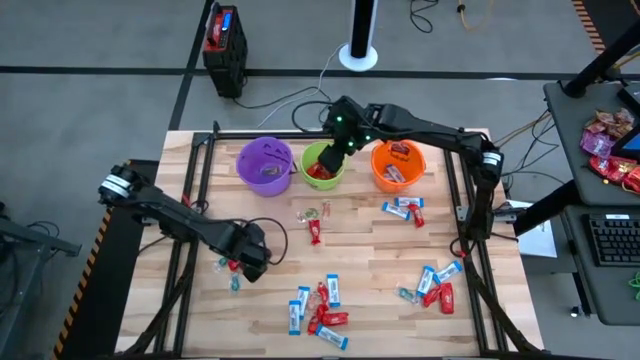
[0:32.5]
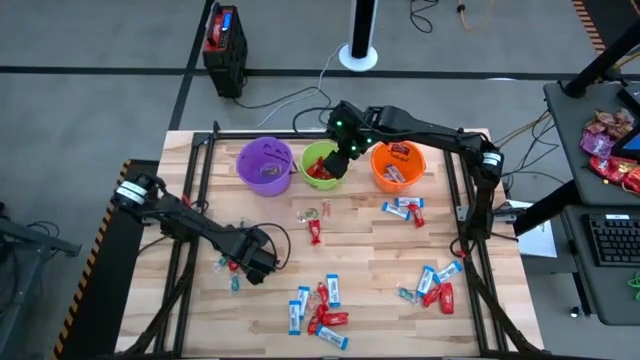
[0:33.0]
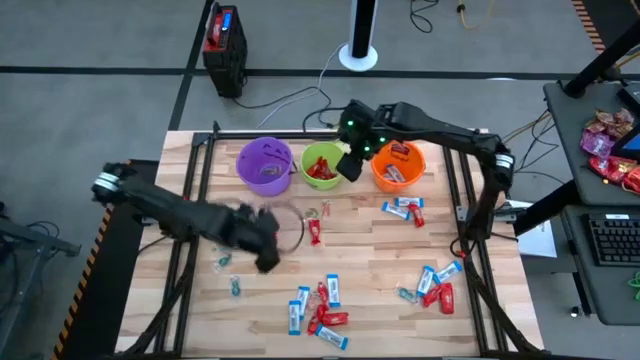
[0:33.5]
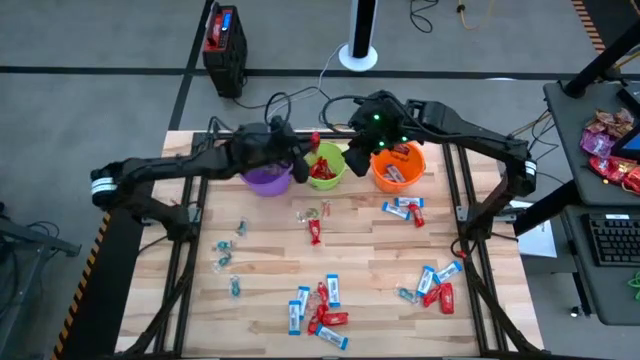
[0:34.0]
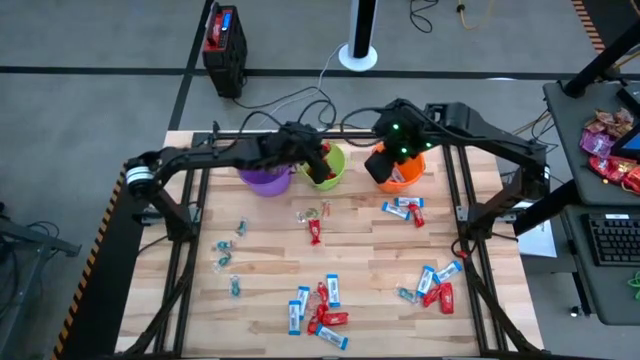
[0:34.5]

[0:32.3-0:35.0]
Task: Sort candy by brand, put in halloween buckets
Put the red chocolate bar into the green bucket

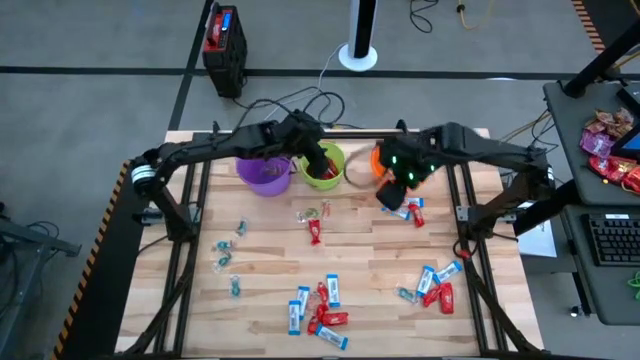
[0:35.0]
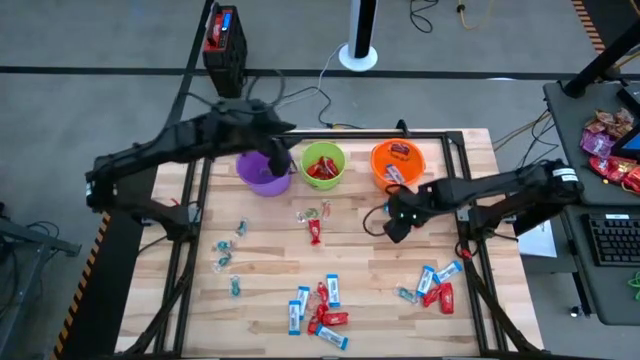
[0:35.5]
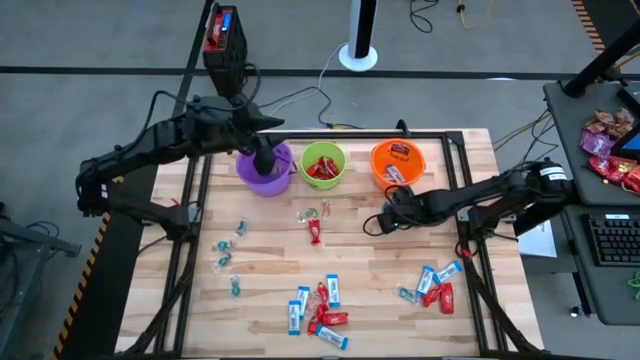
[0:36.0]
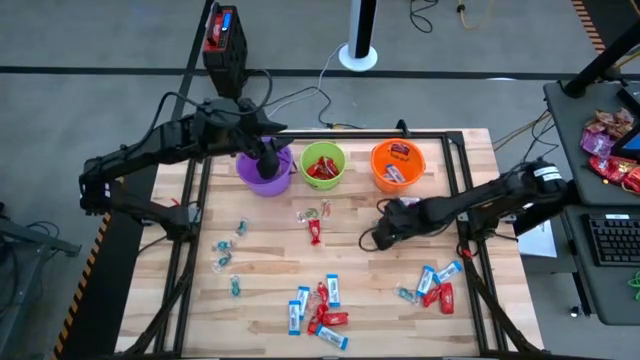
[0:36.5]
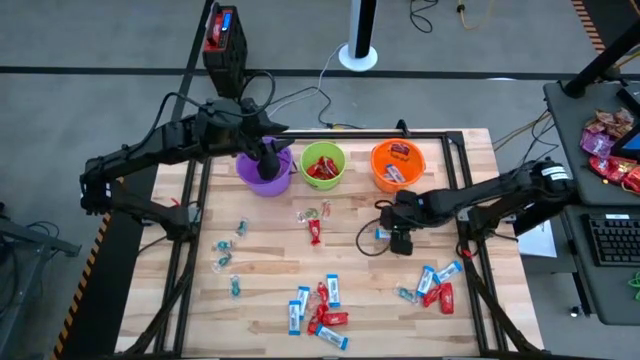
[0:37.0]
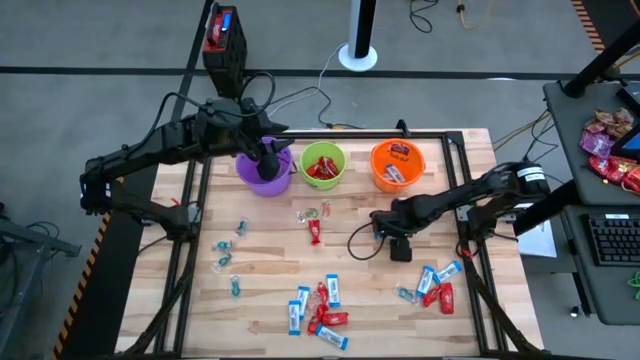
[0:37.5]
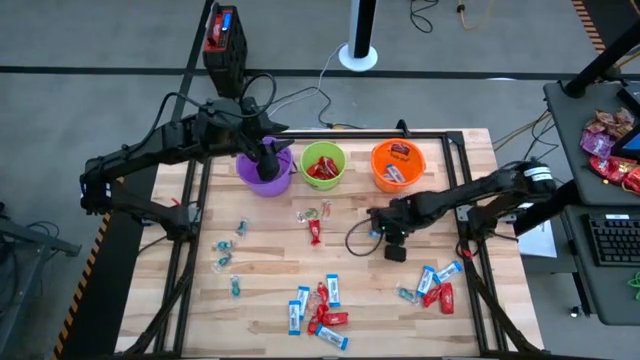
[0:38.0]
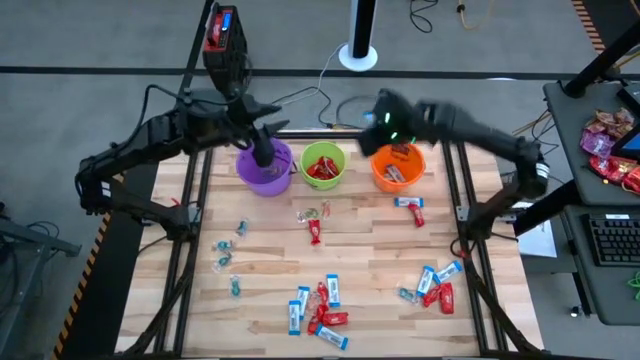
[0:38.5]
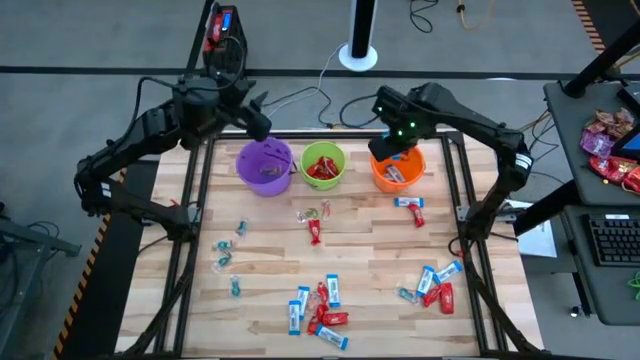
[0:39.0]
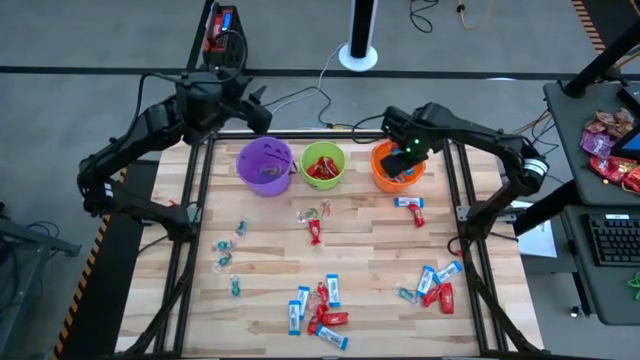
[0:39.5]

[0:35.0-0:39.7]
Put the white chocolate bar into the orange bucket

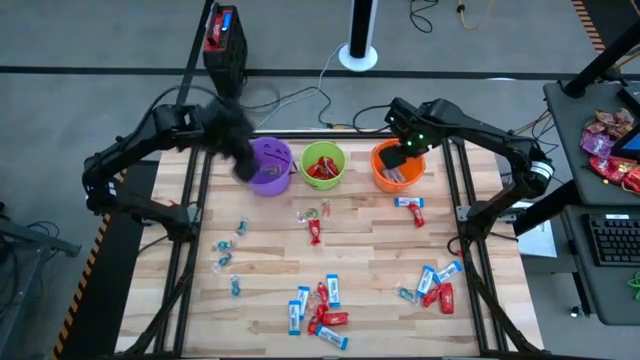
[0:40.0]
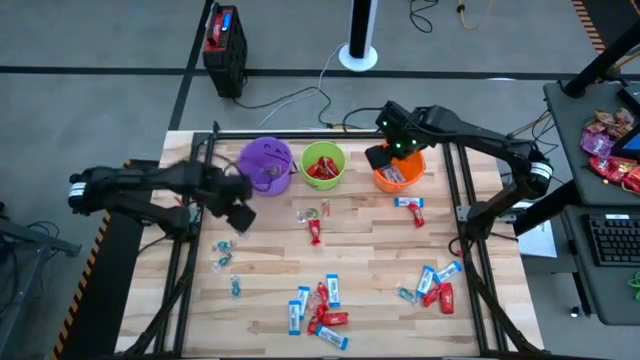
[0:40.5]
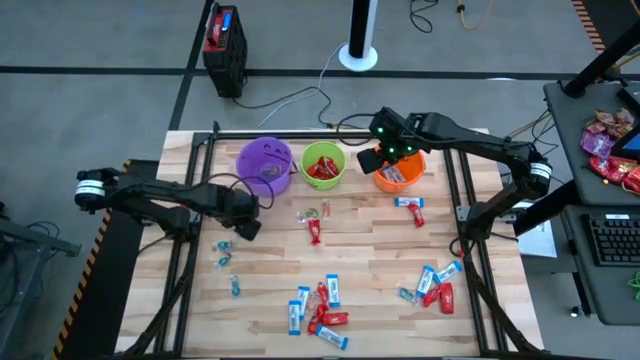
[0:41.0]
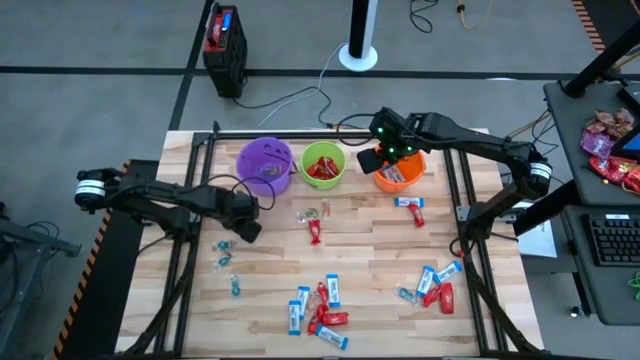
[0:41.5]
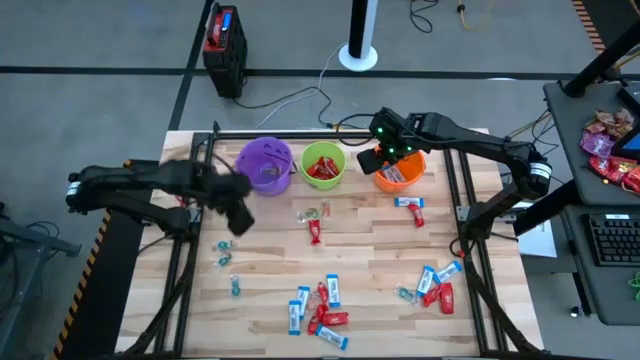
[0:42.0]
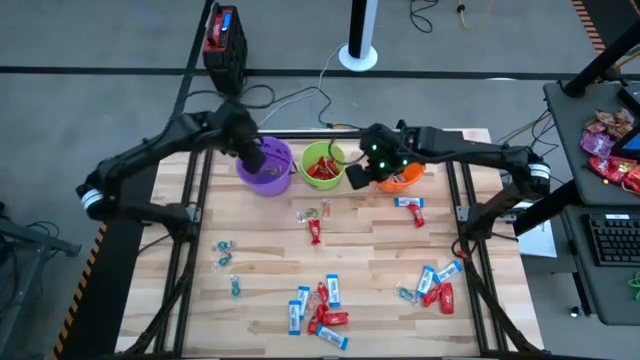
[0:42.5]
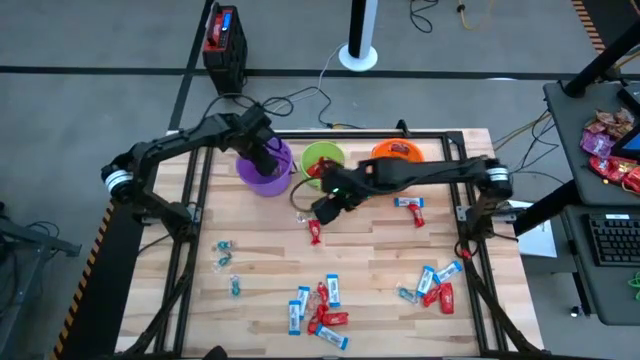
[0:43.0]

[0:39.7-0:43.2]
Put the blue gummy candy into the purple bucket

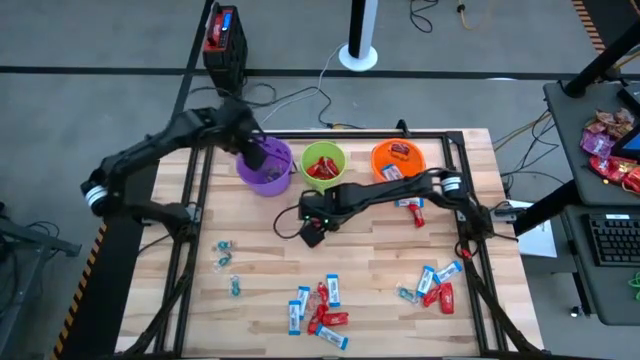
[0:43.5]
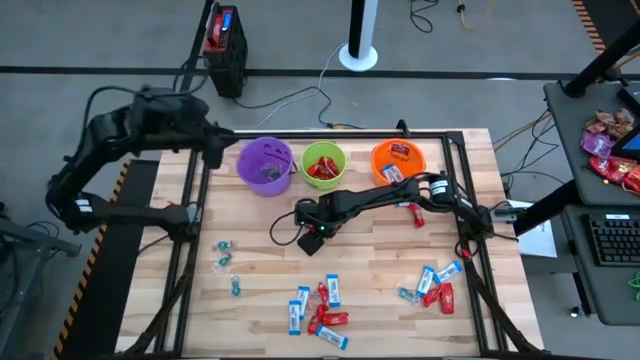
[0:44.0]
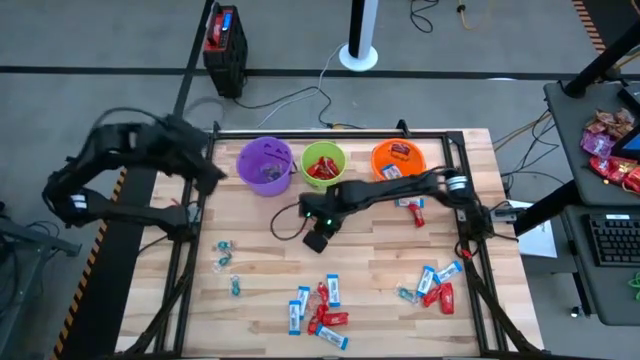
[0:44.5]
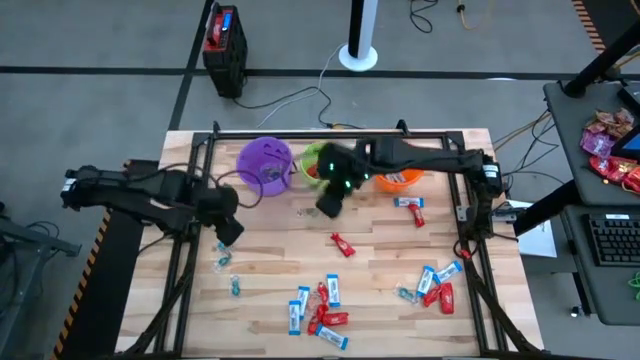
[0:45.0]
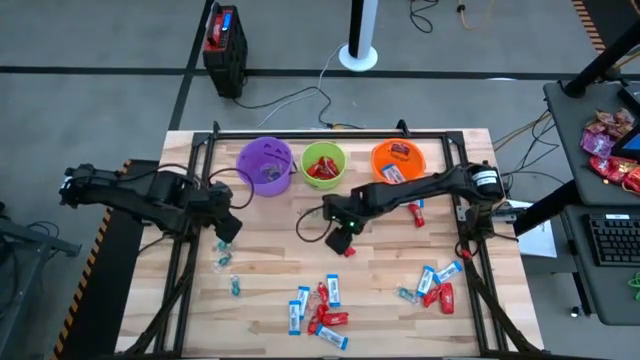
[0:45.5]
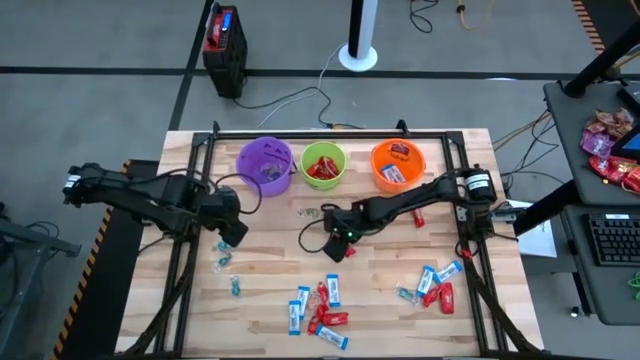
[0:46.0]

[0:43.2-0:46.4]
Put the red chocolate bar into the green bucket

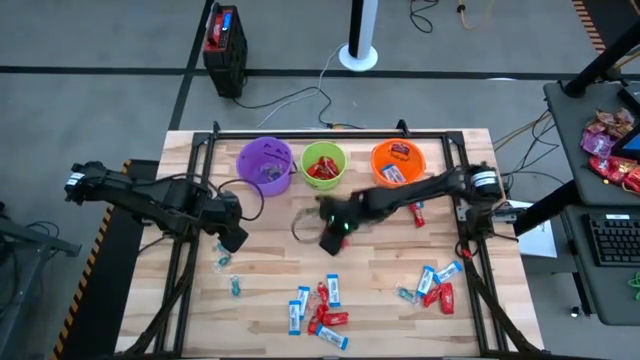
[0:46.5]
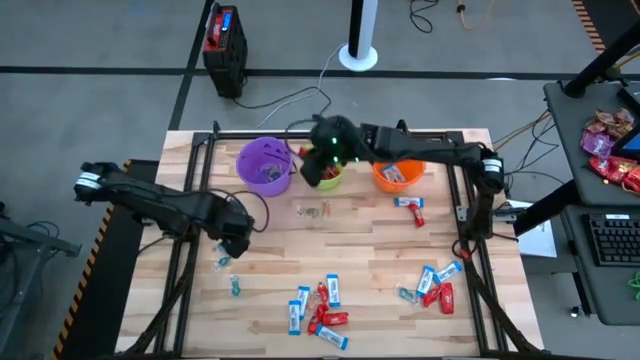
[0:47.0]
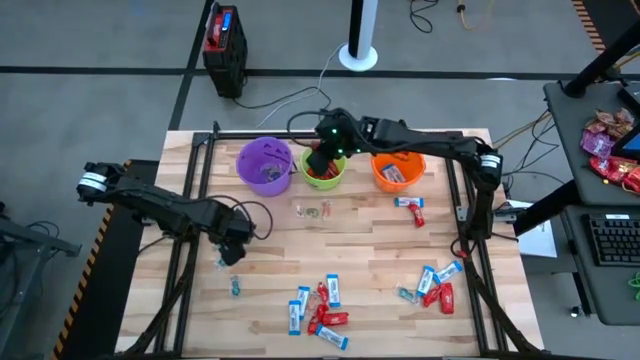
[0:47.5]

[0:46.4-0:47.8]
Put the red chocolate bar into the green bucket

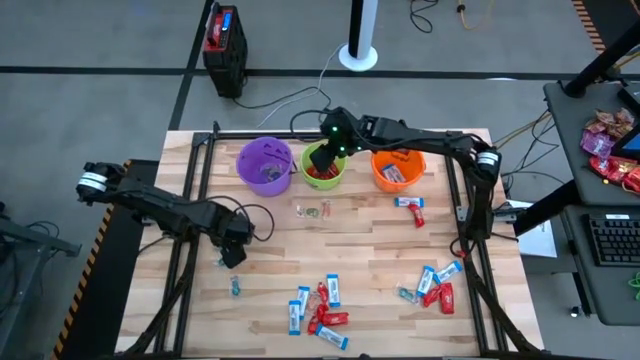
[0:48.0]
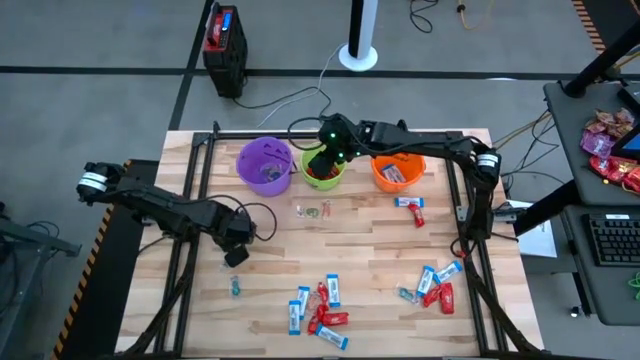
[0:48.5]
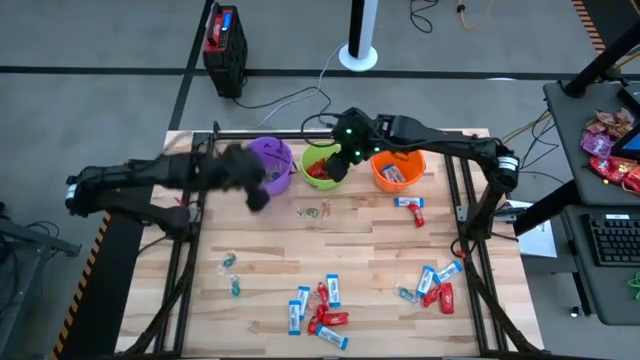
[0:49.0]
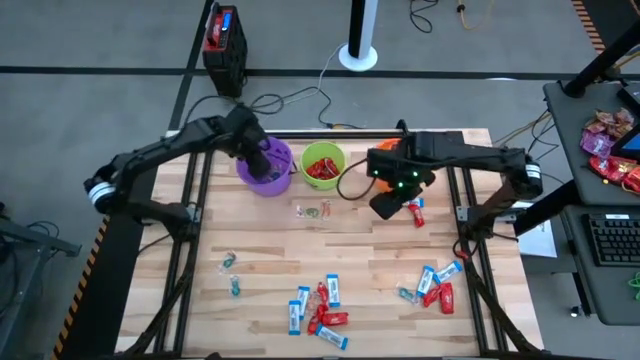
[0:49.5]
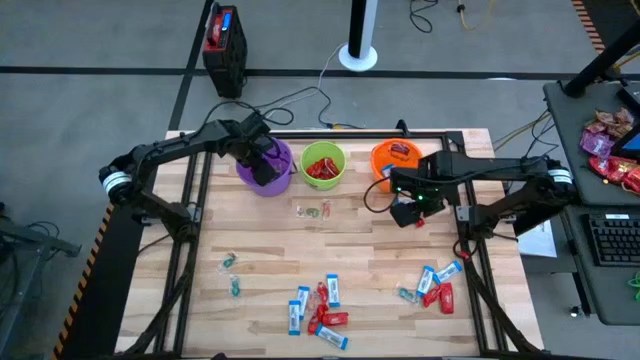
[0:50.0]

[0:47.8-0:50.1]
Put the blue gummy candy into the purple bucket

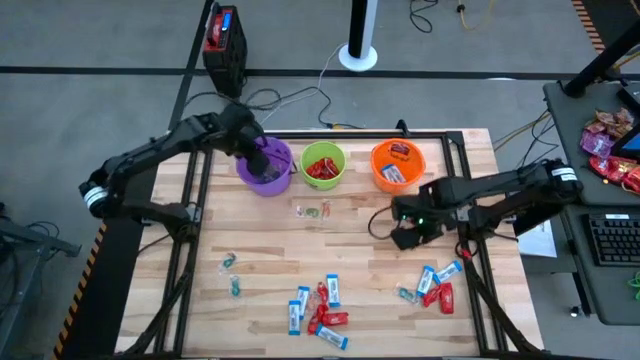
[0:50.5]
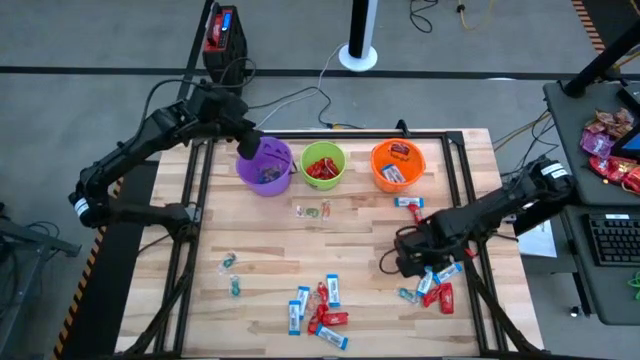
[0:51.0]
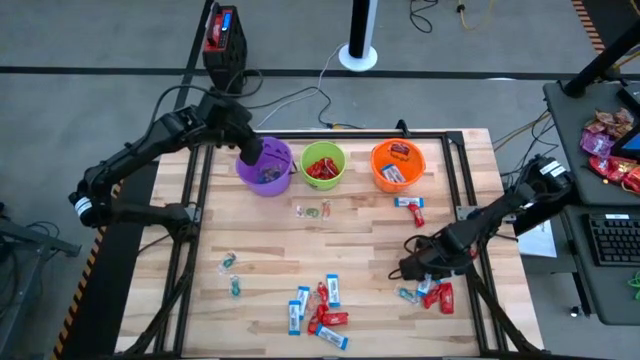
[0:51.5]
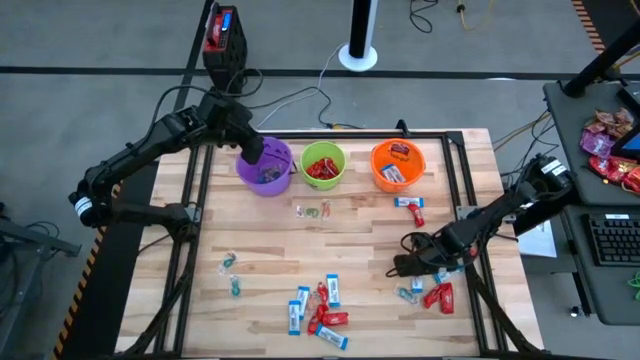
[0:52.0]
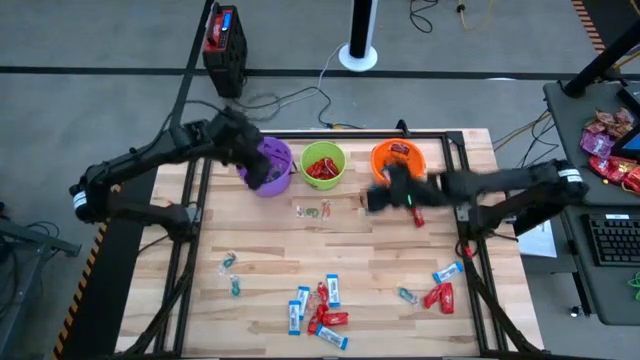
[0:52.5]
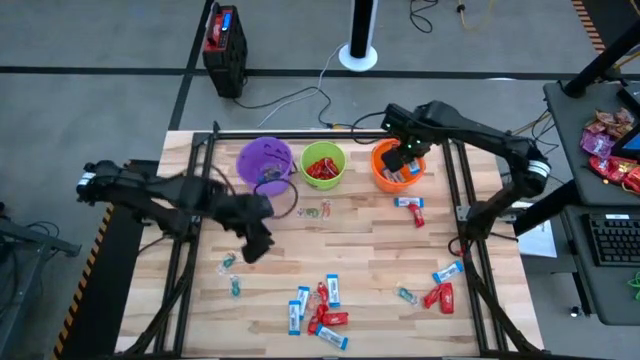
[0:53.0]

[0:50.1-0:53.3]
Put the white chocolate bar into the orange bucket
